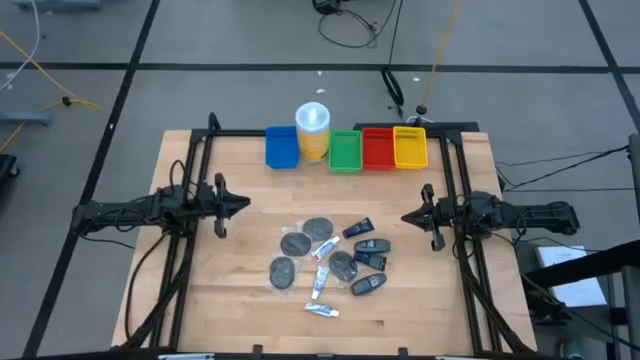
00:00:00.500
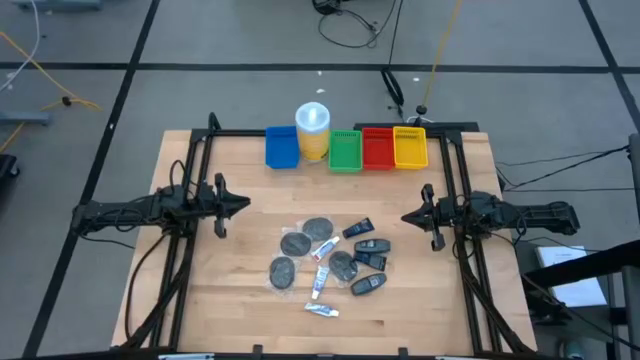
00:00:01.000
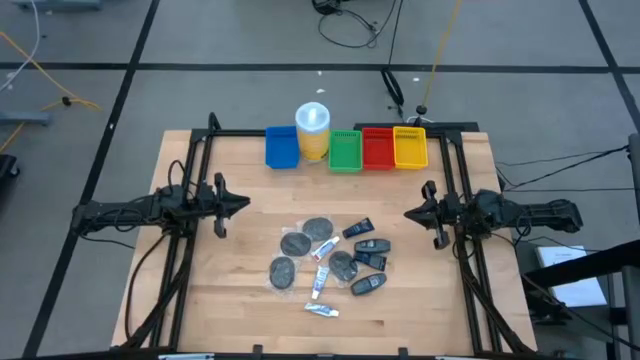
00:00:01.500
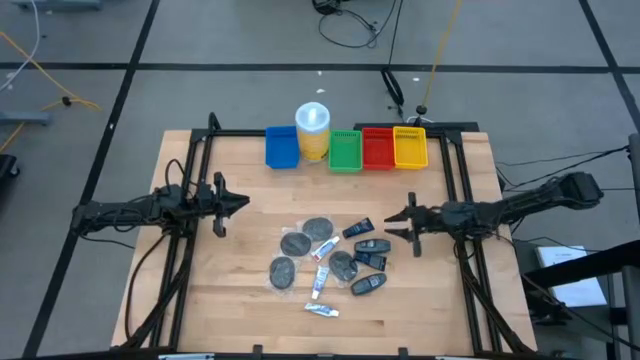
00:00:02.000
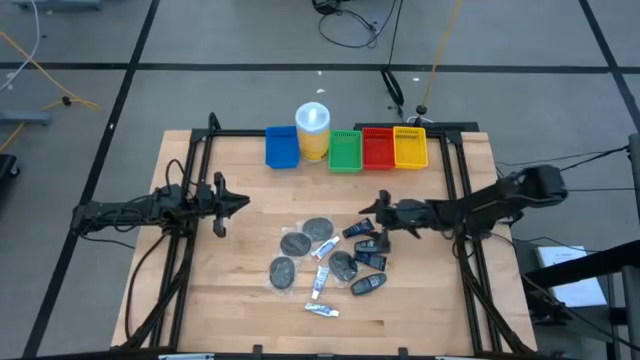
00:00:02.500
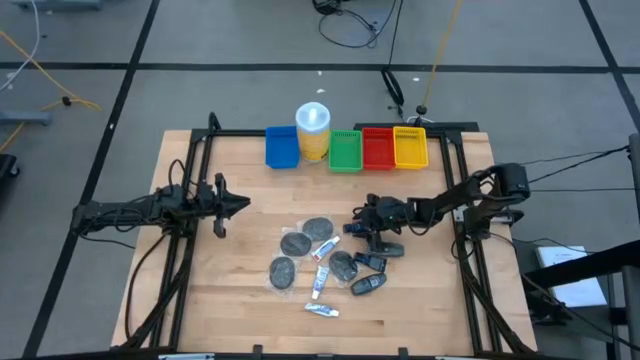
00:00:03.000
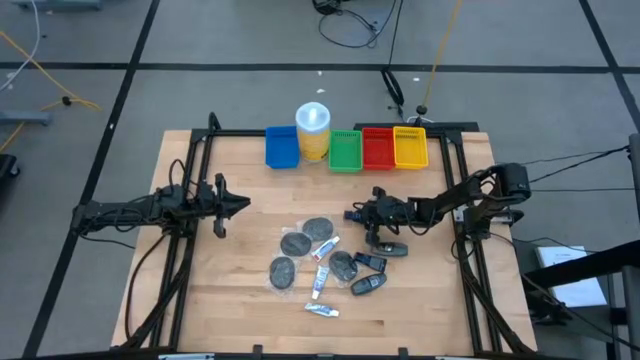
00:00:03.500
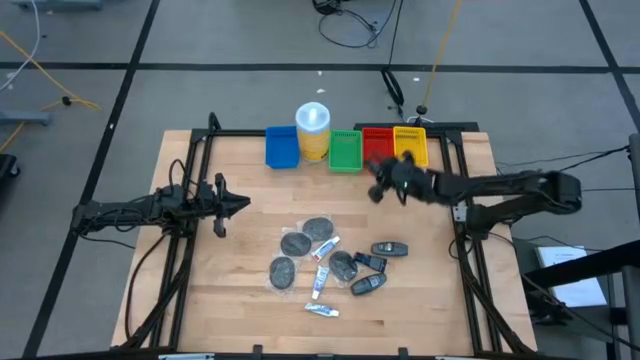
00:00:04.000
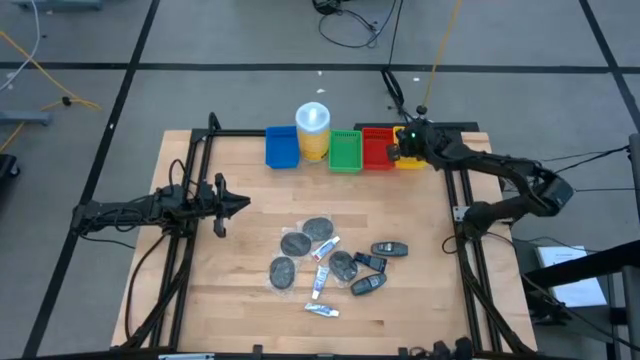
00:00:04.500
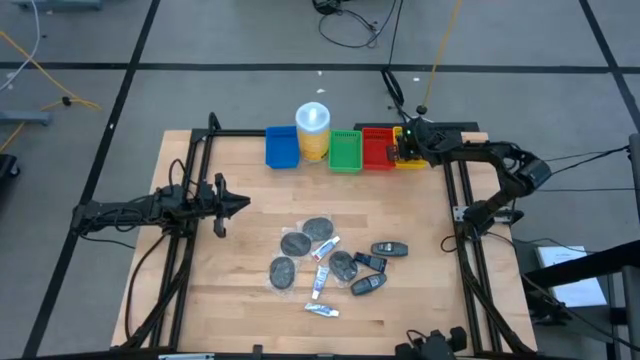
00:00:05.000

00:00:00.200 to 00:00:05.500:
Task: Pick & Place Travel size toiletries
Put the shave cream into the yellow basket

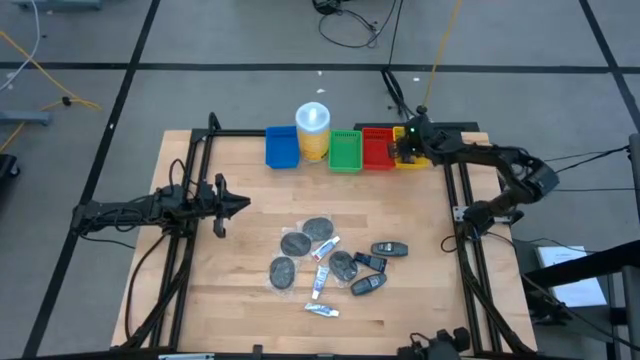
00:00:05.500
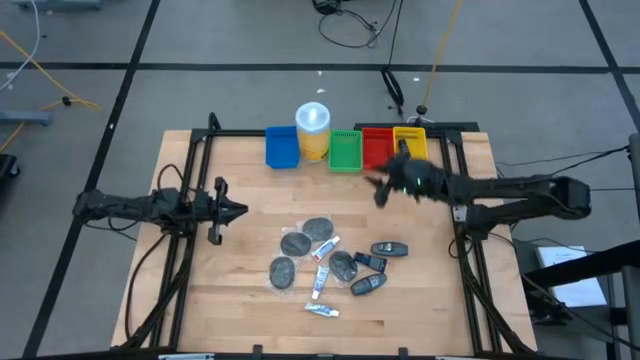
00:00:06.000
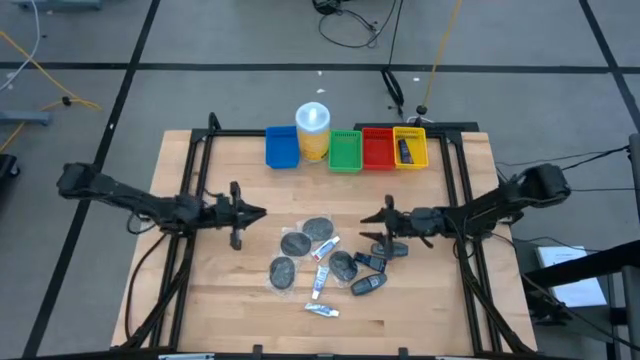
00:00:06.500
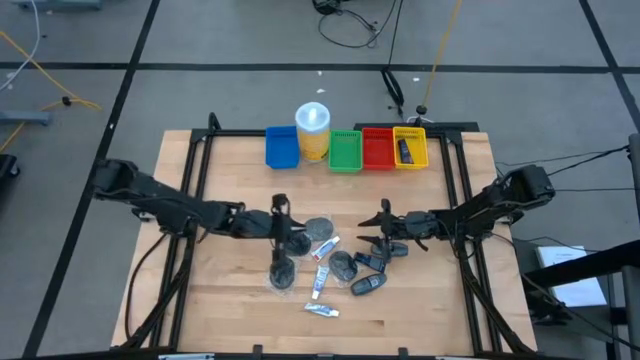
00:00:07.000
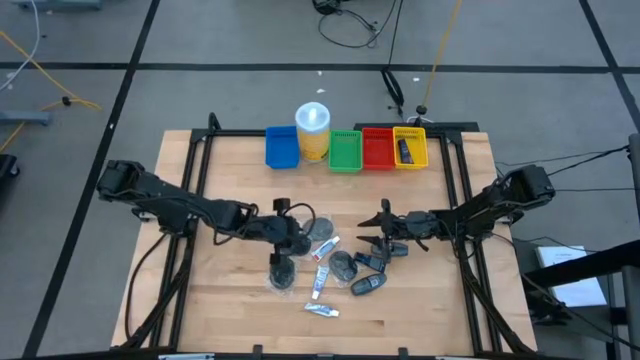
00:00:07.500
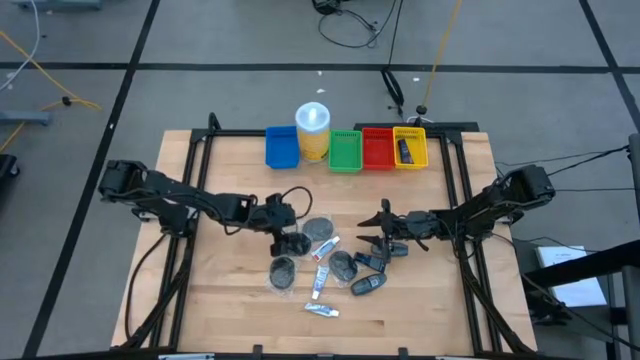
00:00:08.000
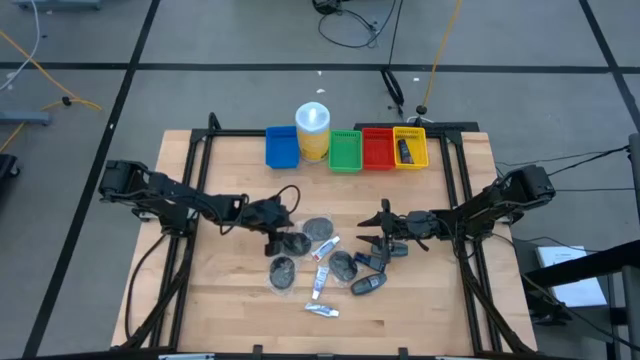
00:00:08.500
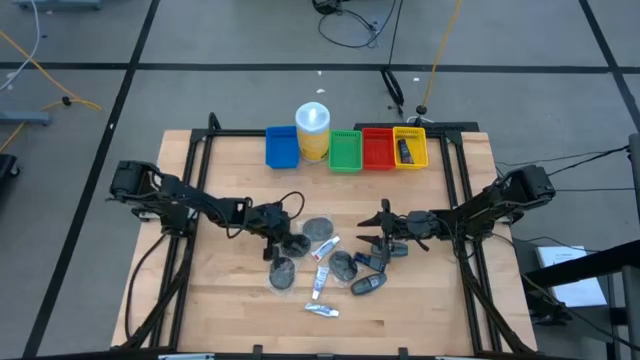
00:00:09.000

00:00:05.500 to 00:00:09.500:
Put the hairbrush into the blue basket

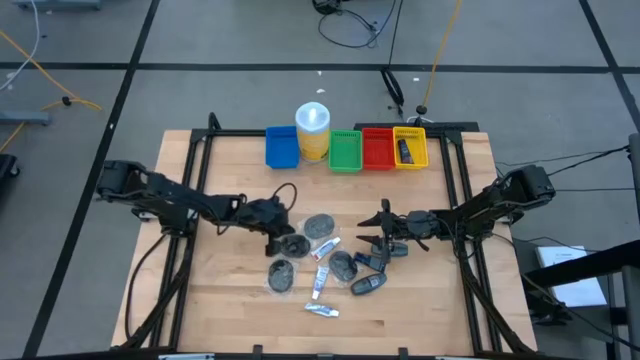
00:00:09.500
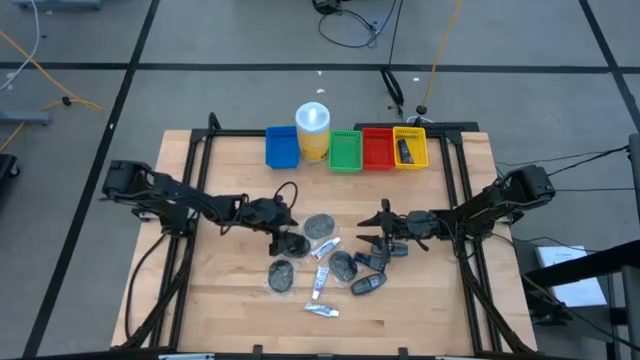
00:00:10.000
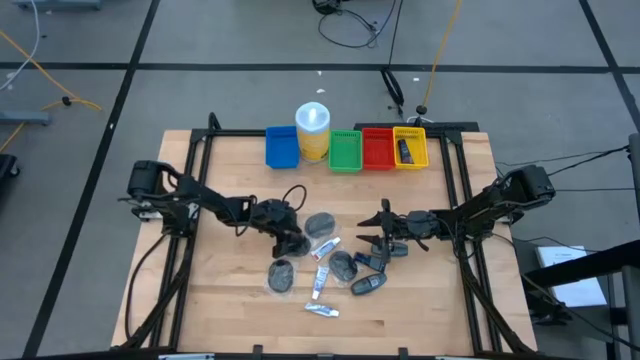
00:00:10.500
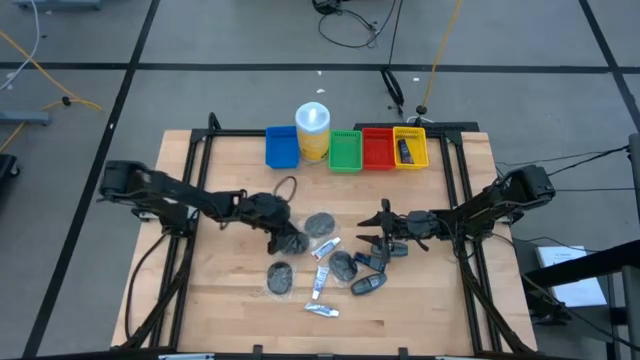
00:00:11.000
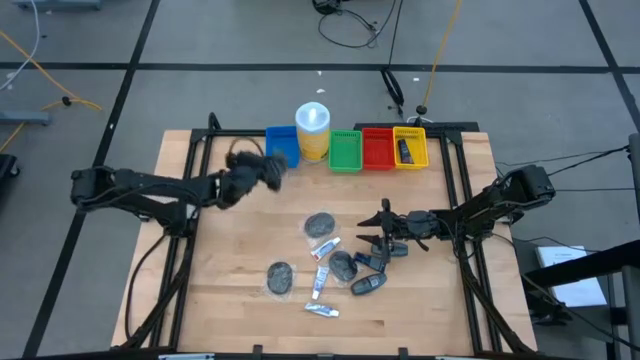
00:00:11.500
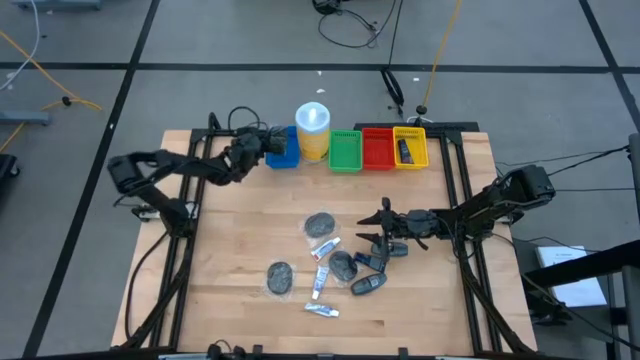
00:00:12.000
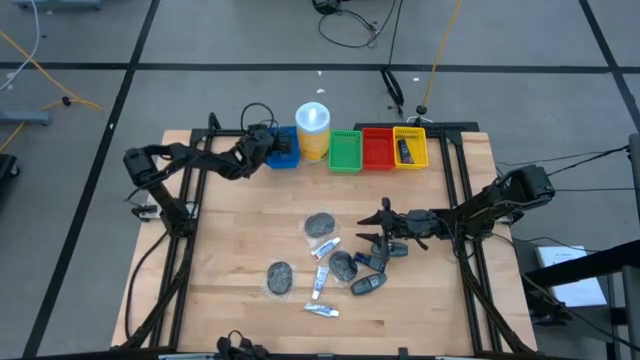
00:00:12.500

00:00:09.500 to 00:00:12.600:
Put the hairbrush into the blue basket

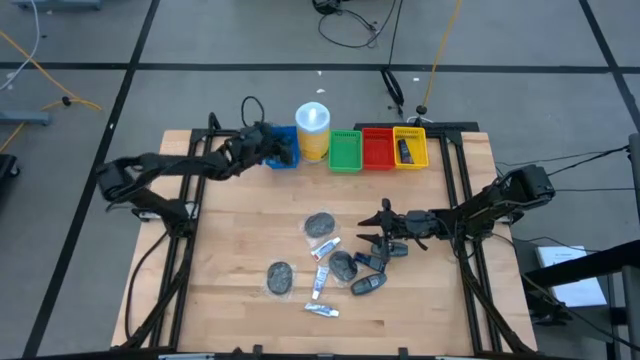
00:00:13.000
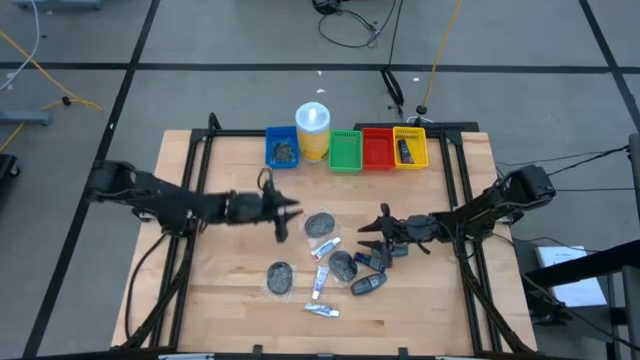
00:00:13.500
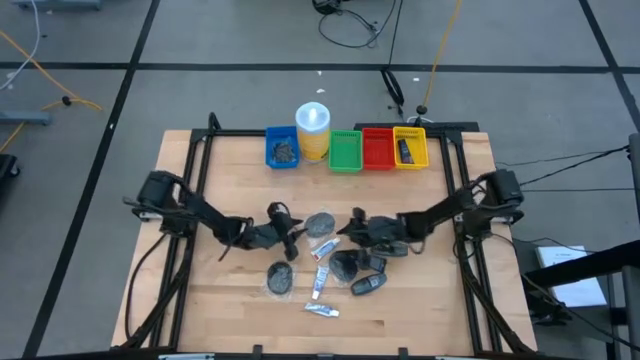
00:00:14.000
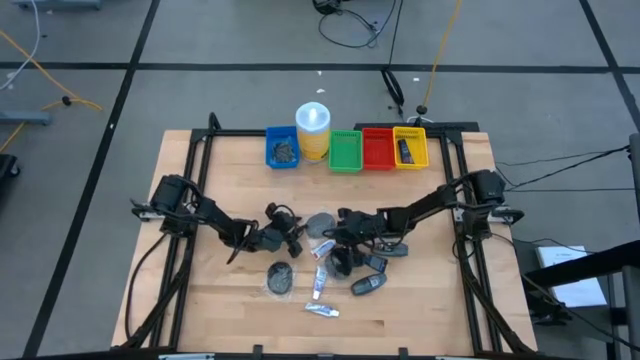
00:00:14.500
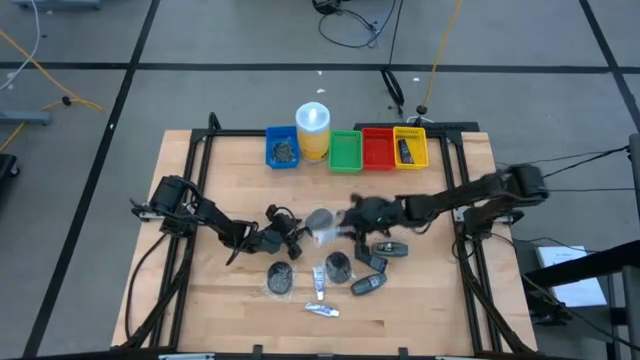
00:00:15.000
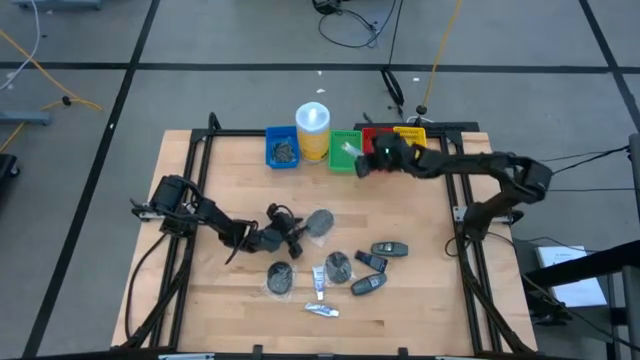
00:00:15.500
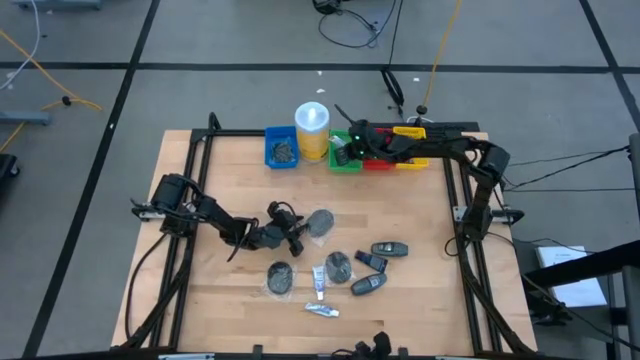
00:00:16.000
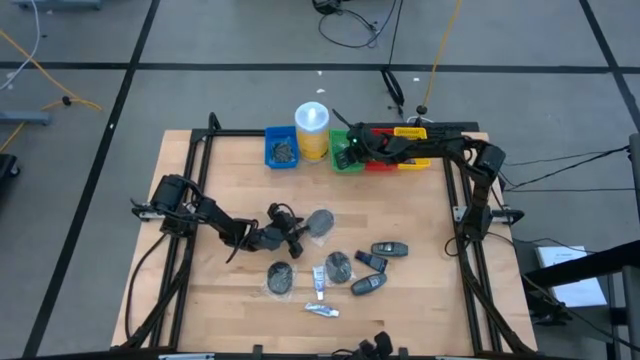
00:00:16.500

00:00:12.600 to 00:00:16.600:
Put the toothpaste into the green basket

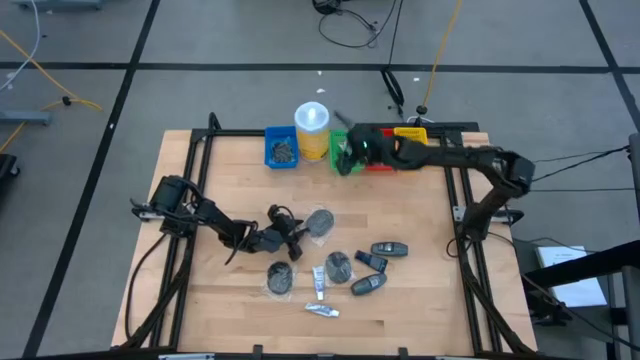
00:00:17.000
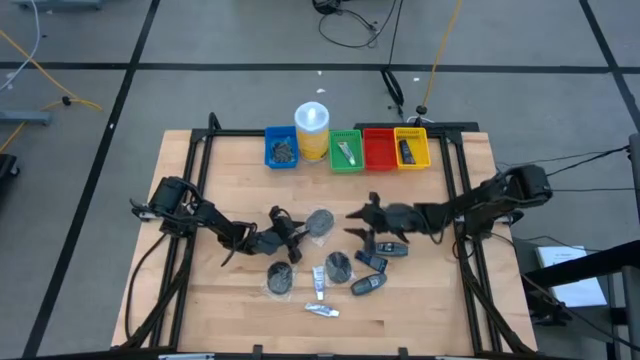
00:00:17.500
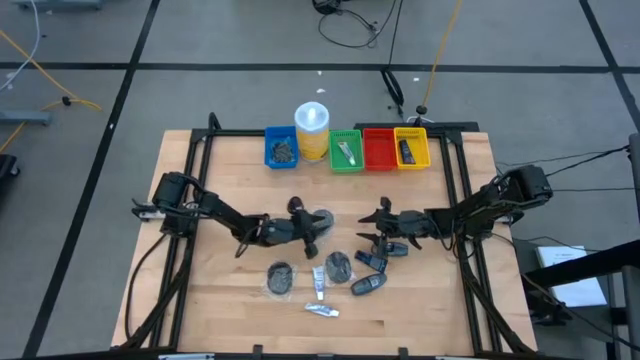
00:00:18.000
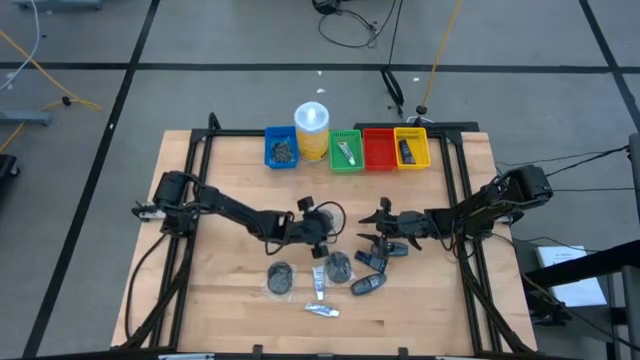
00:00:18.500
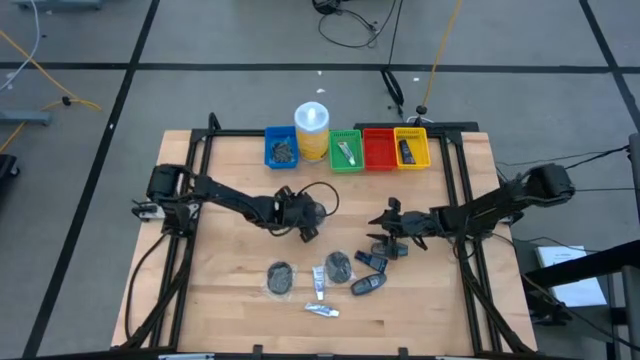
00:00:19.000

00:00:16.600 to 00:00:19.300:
Adjust the hairbrush

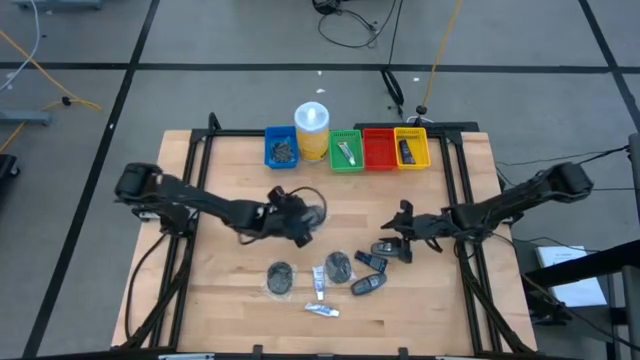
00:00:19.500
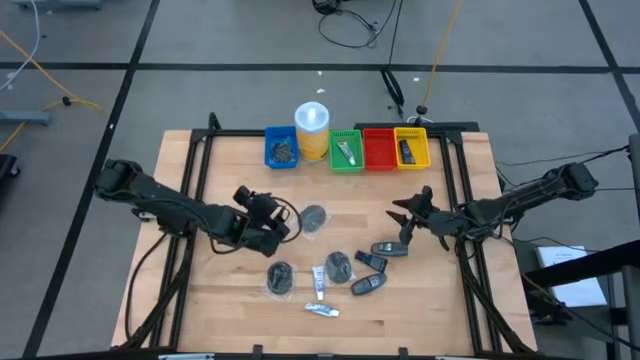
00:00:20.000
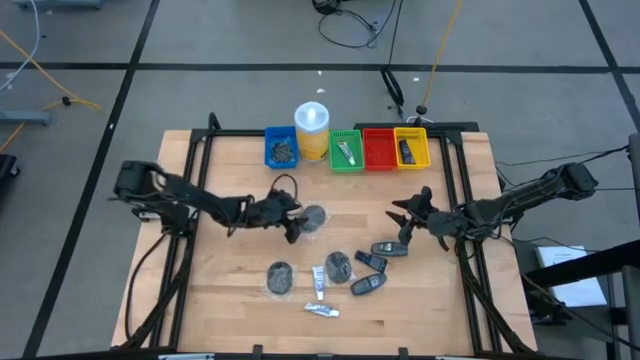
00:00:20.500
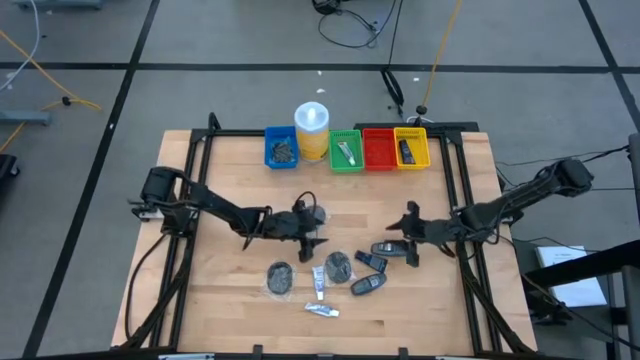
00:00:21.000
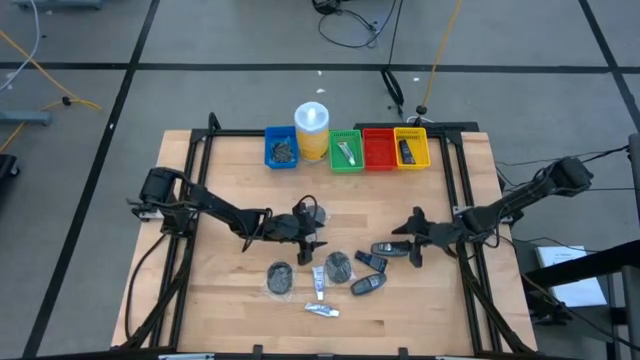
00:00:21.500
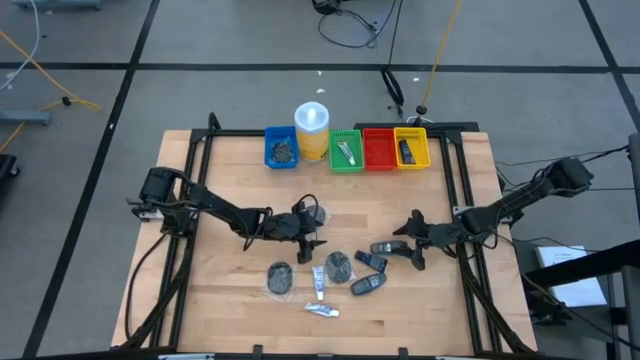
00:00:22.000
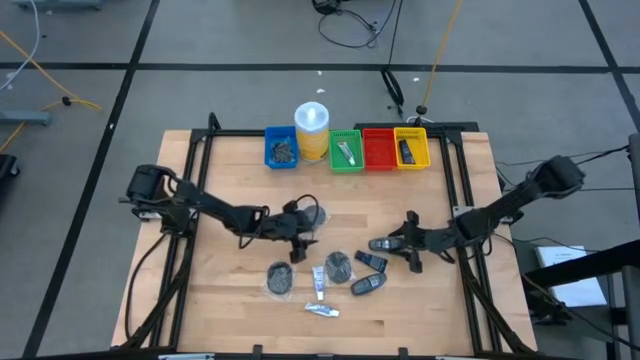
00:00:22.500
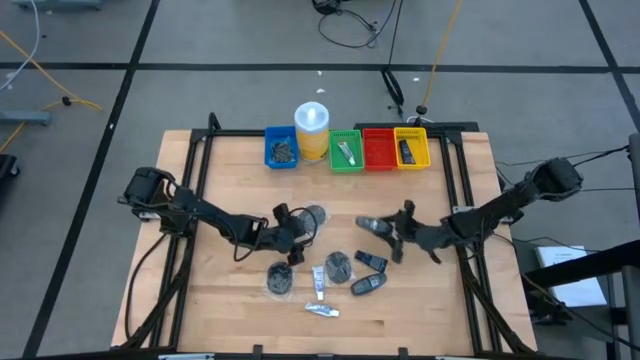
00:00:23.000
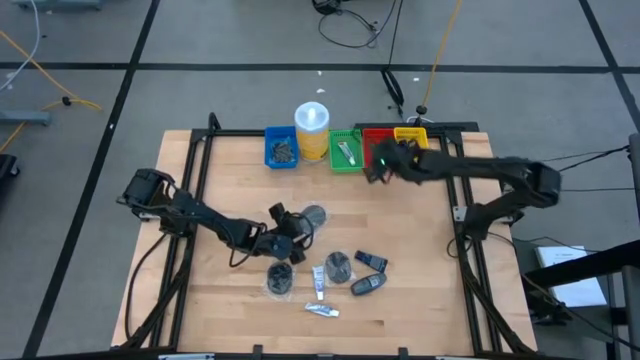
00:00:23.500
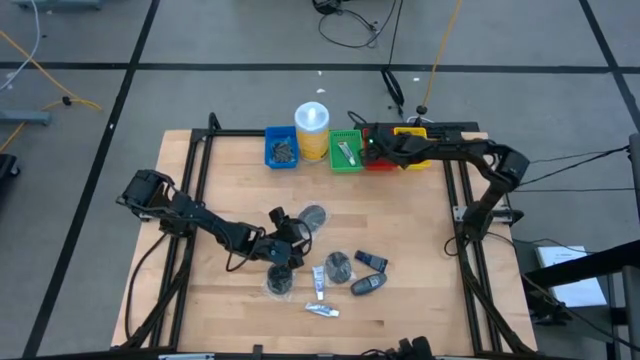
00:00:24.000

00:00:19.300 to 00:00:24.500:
Put the deodorant into the red basket
